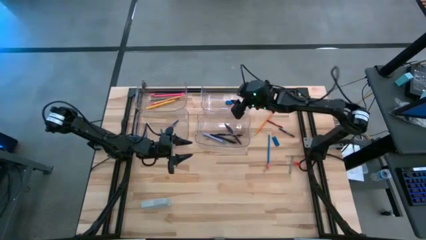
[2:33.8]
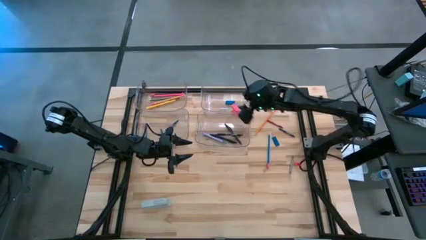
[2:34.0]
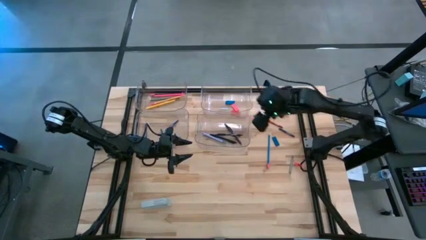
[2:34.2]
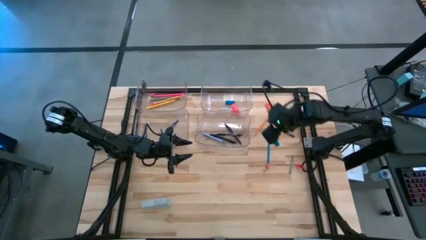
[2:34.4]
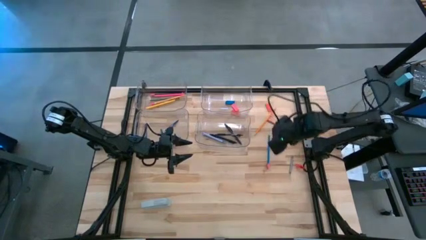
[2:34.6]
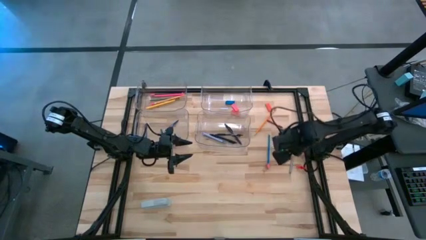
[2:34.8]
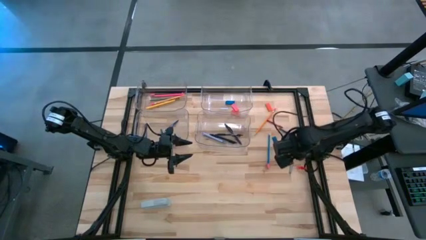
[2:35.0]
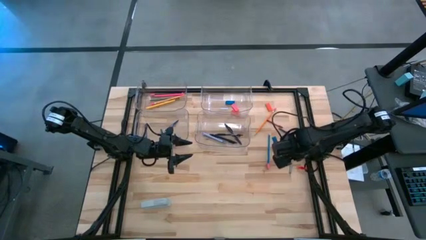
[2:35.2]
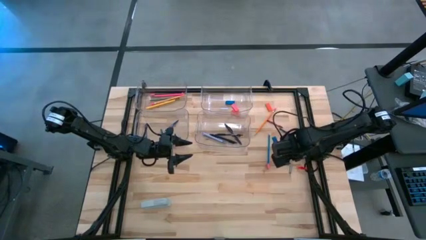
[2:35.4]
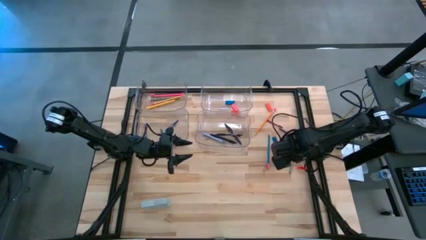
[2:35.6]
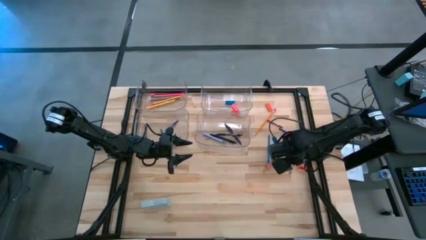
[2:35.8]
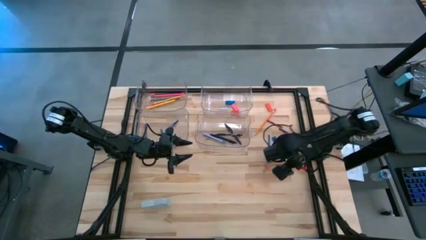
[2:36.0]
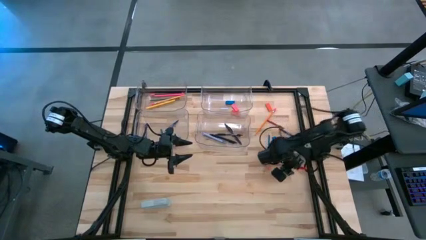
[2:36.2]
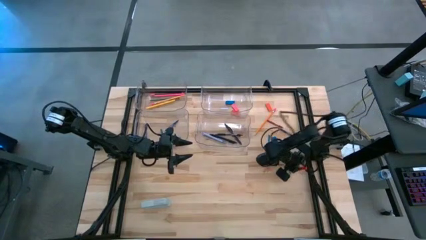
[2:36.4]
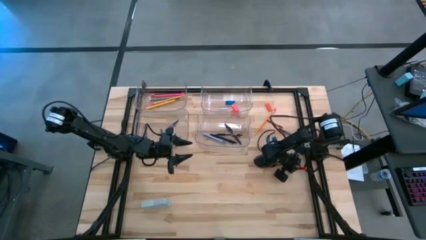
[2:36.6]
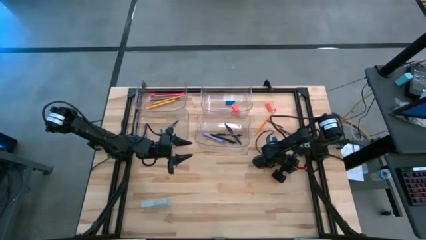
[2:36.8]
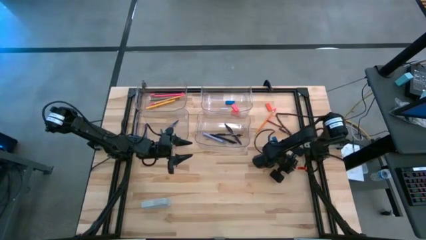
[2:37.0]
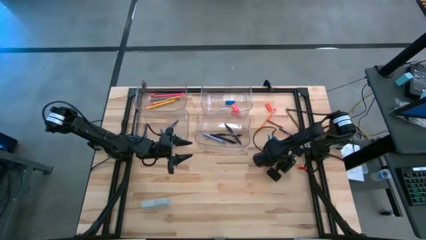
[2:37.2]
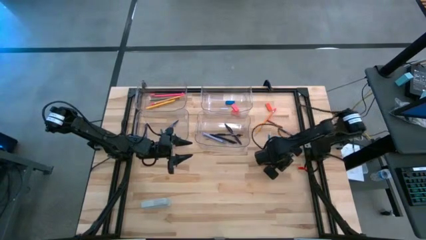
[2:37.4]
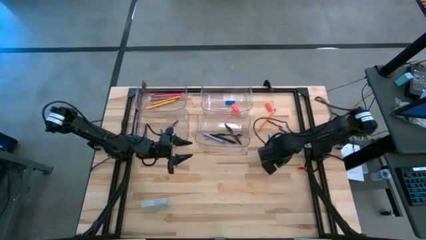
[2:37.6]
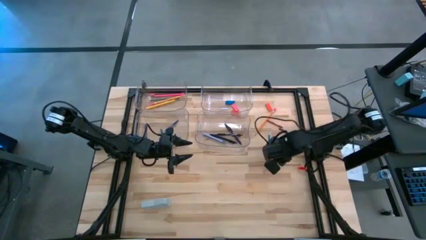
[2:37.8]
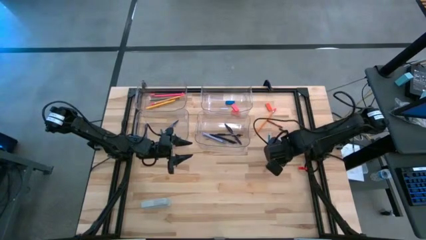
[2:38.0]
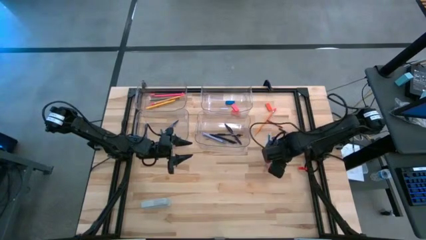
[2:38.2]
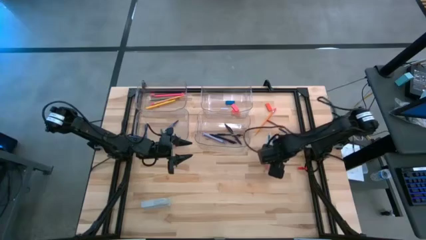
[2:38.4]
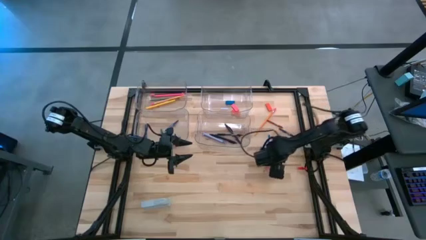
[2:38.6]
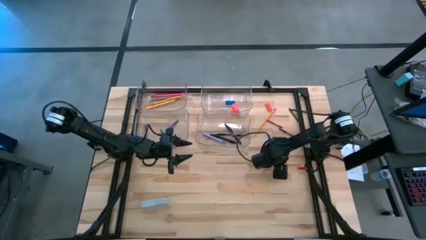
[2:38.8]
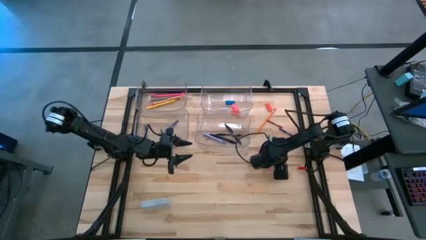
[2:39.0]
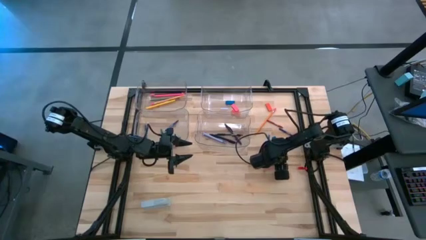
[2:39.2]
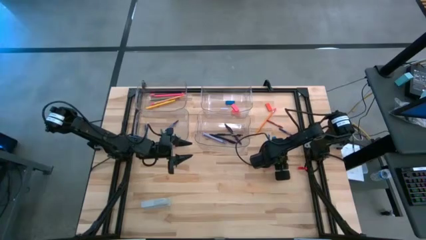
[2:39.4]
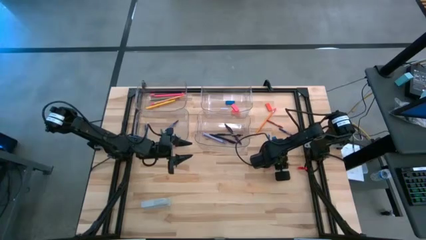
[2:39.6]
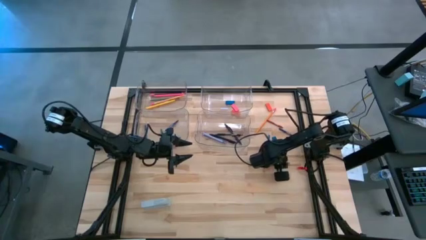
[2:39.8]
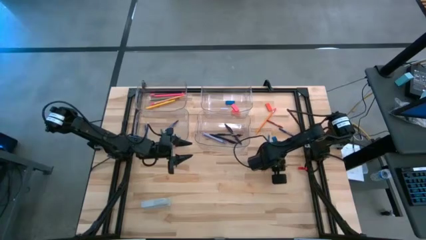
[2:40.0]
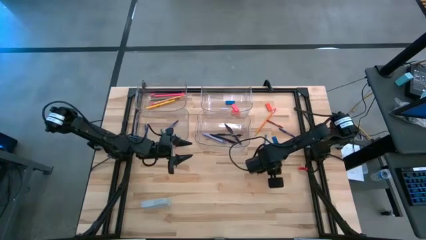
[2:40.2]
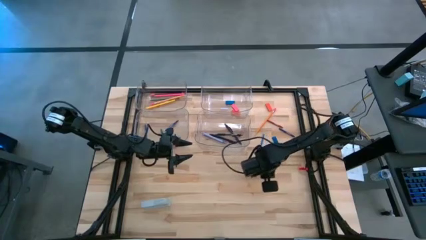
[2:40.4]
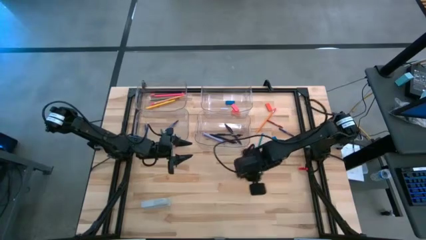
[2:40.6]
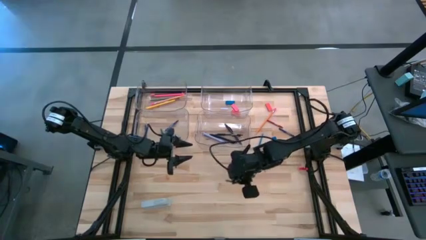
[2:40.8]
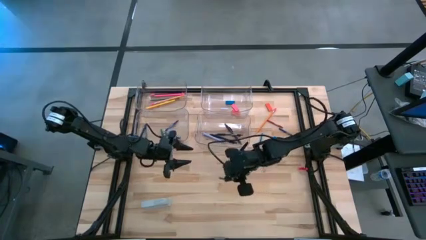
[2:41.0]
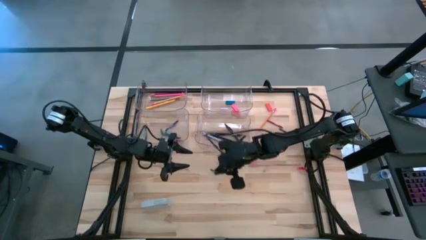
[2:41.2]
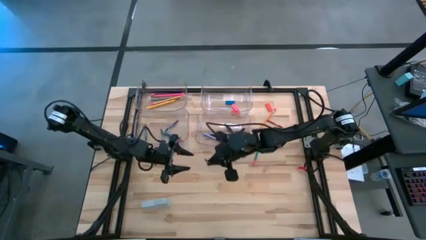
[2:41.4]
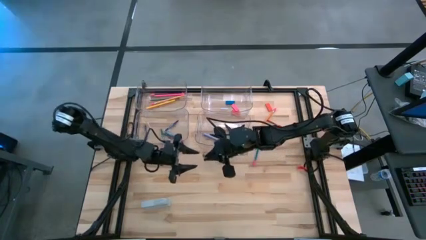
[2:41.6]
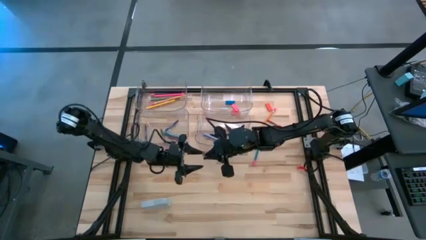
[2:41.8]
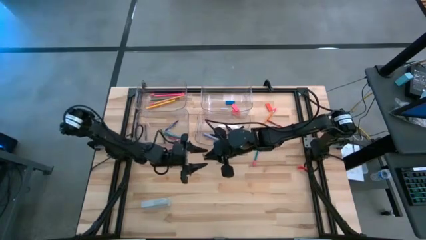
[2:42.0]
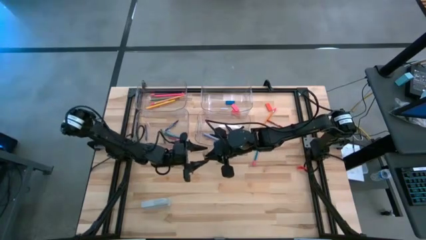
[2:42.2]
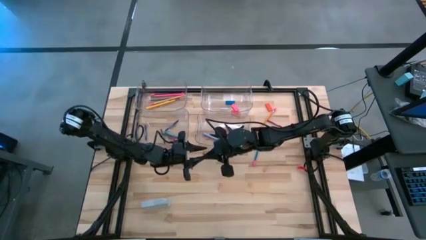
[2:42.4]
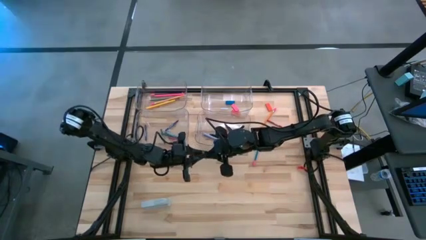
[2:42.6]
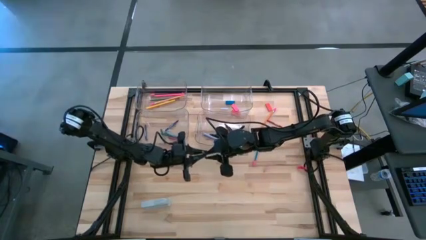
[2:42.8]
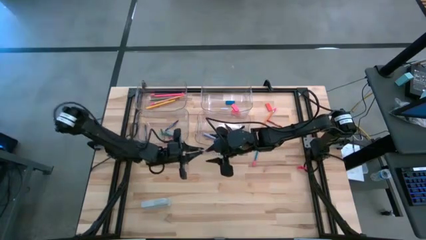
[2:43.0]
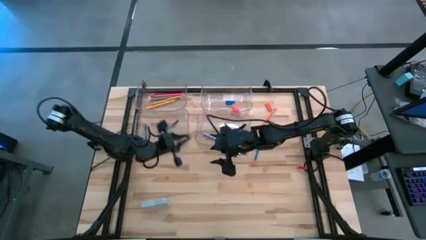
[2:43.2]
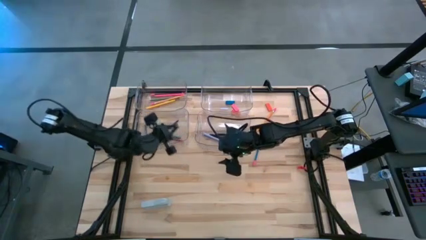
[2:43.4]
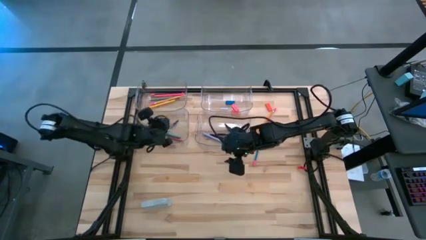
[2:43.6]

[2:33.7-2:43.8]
Task: Sort crayons/erasers/pens/pencils in bins
Put the gray crayon into the bottom left transparent bin

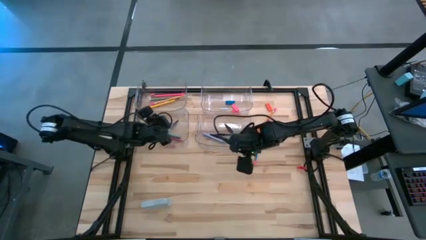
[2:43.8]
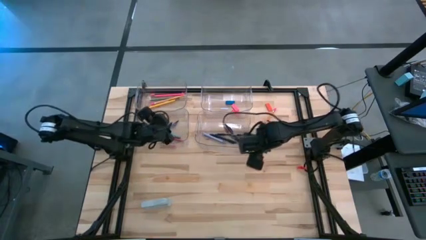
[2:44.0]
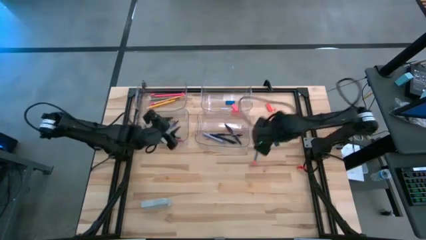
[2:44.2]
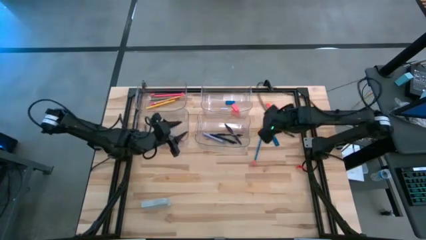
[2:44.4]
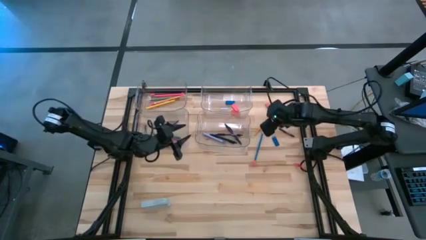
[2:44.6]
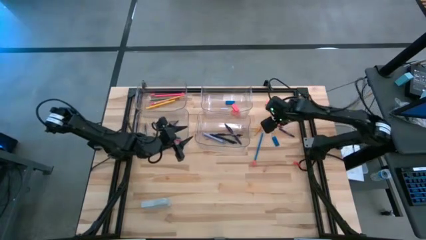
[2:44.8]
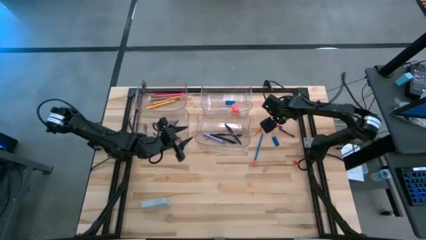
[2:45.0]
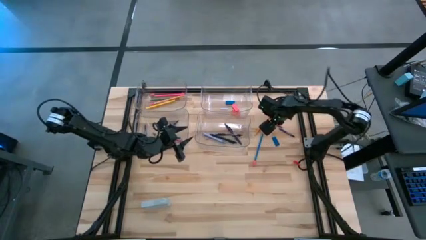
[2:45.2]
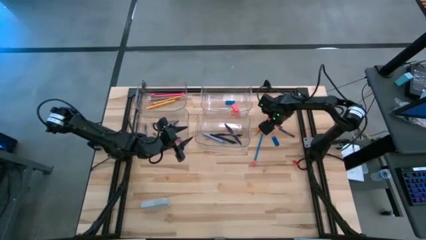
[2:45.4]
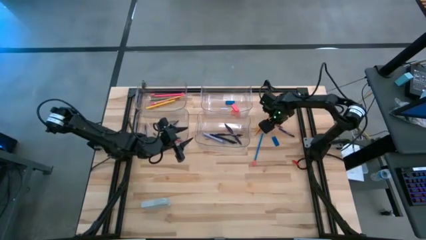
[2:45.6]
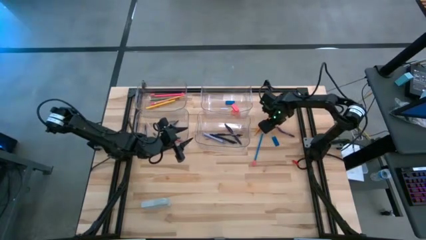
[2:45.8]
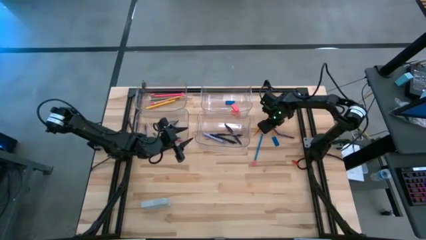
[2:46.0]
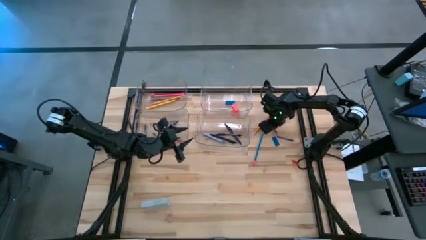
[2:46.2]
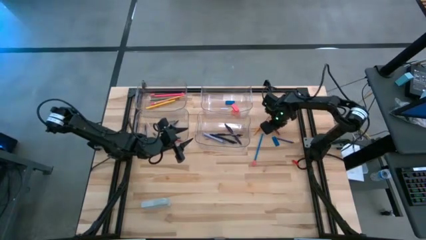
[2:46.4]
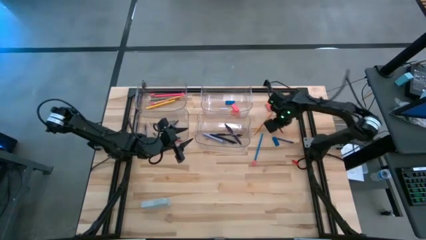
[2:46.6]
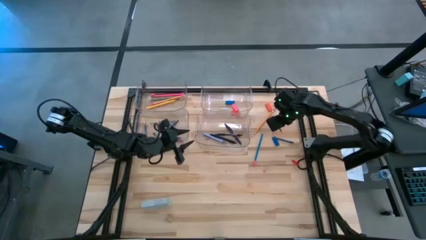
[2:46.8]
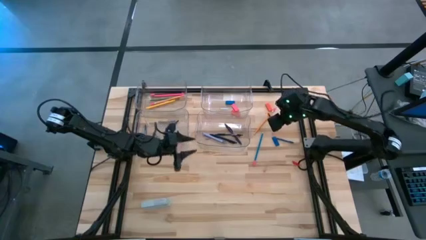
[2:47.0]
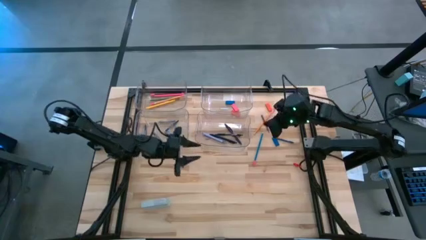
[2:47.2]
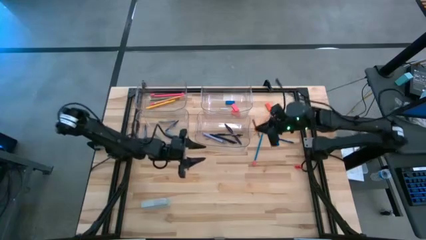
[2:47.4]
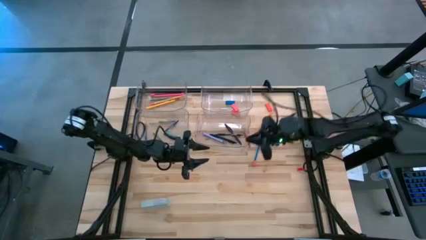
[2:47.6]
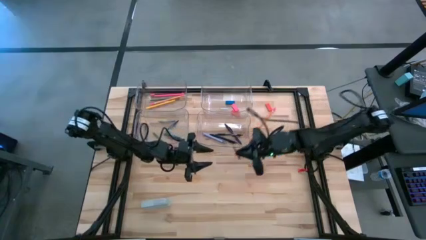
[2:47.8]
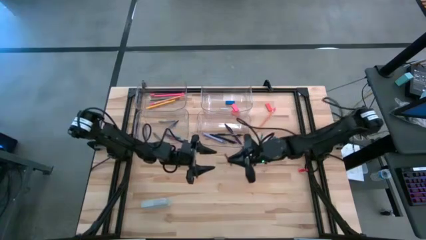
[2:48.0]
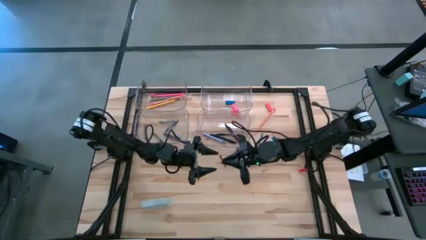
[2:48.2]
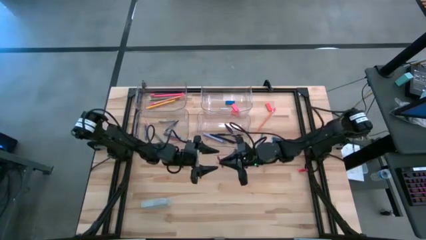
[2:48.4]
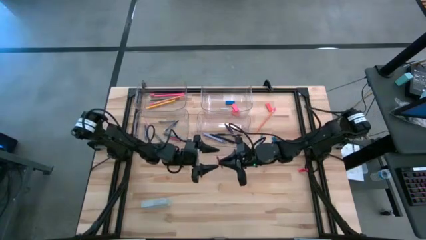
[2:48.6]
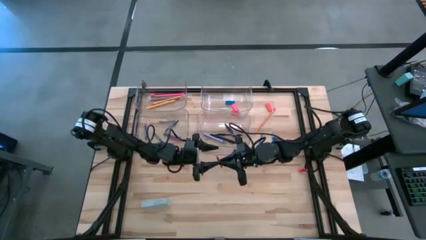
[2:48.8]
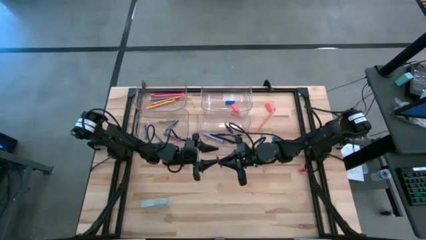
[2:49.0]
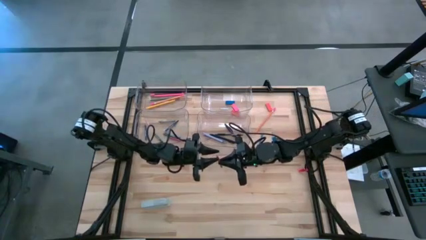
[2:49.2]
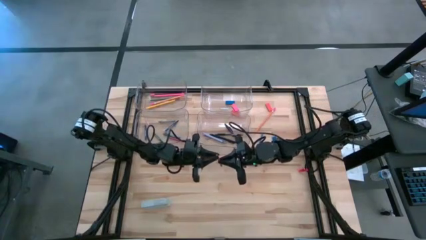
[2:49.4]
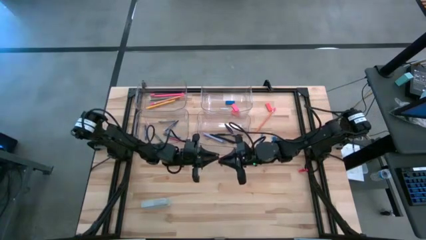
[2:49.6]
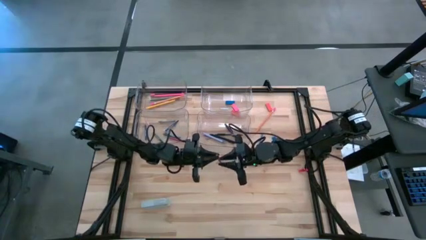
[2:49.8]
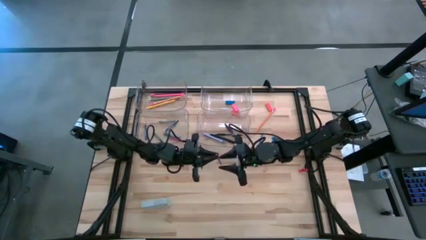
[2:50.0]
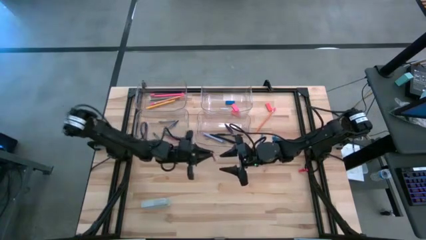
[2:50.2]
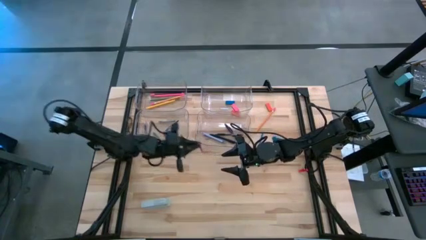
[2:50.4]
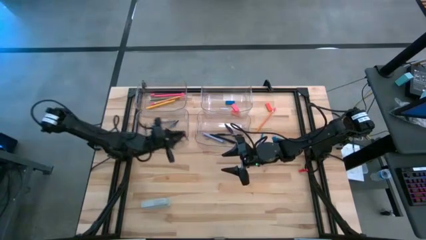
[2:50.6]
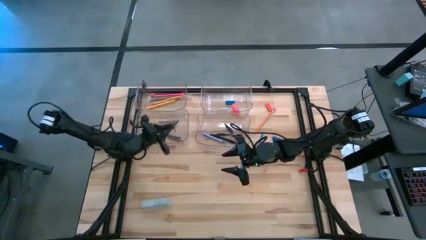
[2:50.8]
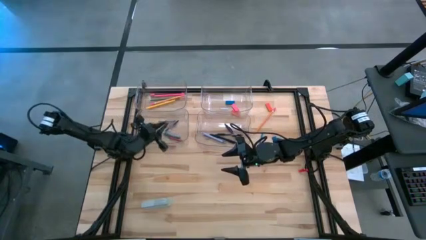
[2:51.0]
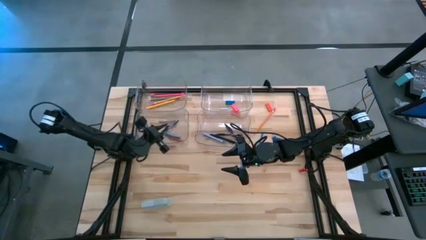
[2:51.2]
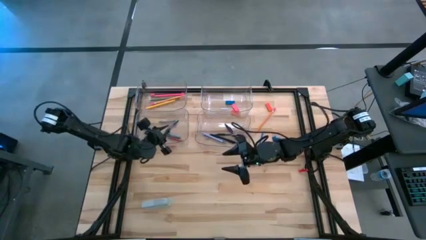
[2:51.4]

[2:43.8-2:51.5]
Put the red crayon into the bottom left transparent bin
